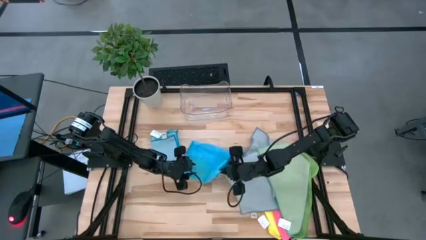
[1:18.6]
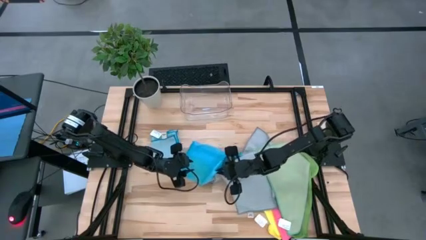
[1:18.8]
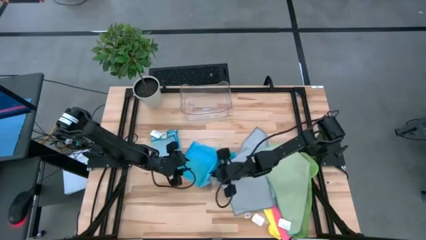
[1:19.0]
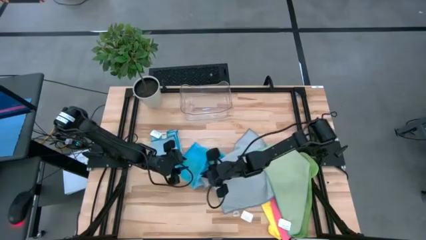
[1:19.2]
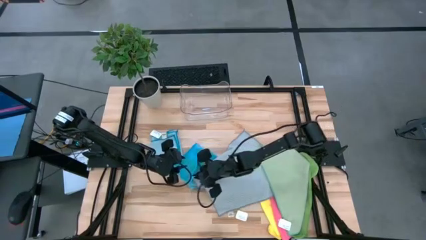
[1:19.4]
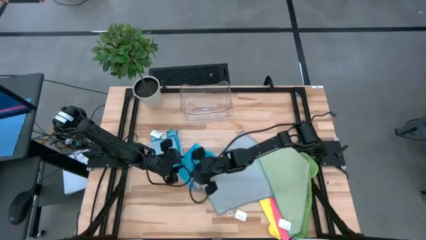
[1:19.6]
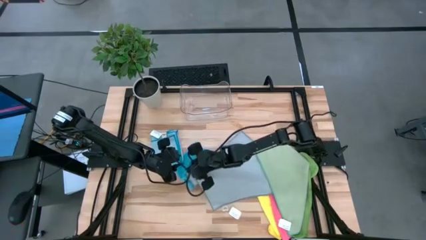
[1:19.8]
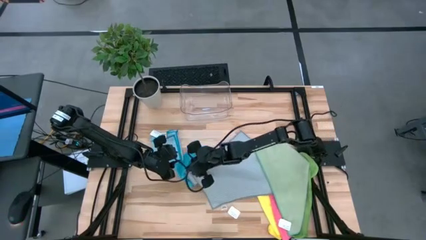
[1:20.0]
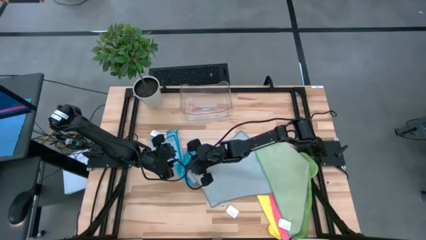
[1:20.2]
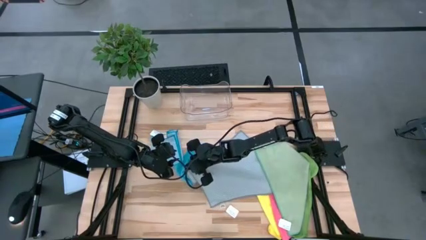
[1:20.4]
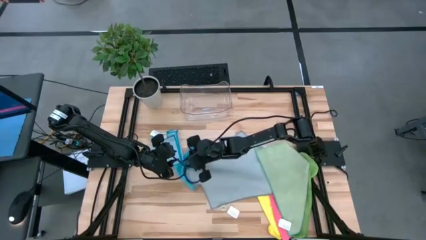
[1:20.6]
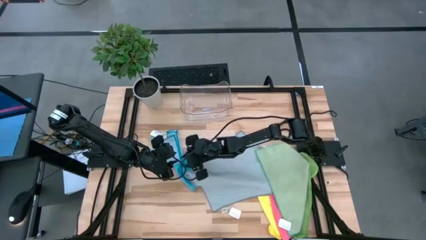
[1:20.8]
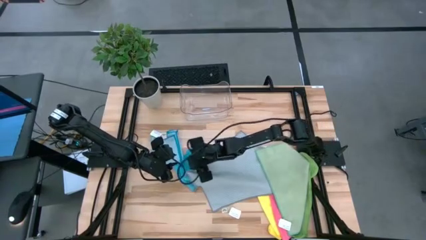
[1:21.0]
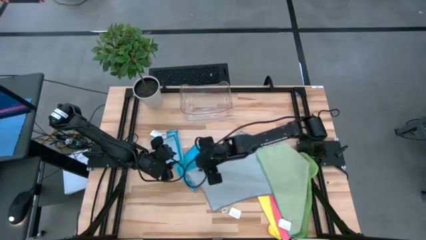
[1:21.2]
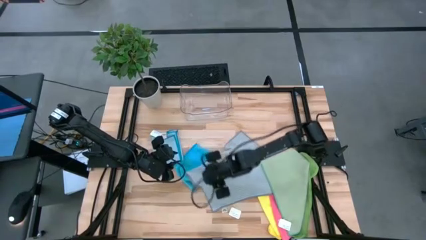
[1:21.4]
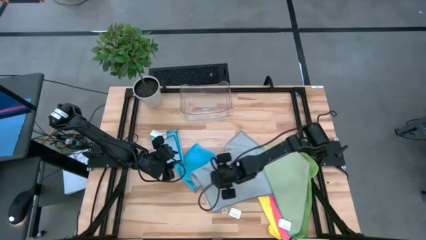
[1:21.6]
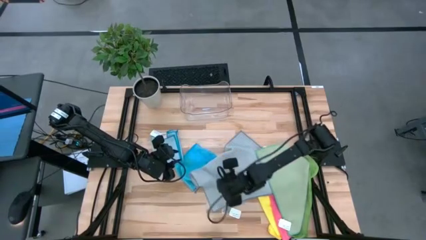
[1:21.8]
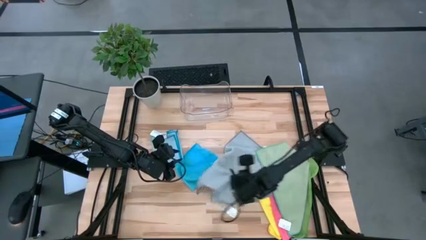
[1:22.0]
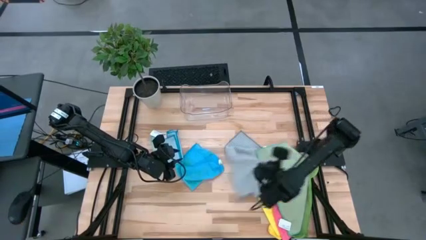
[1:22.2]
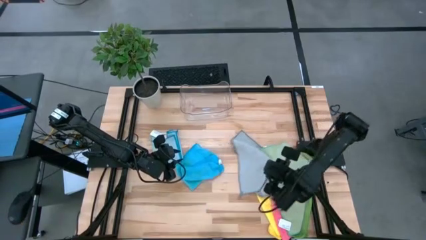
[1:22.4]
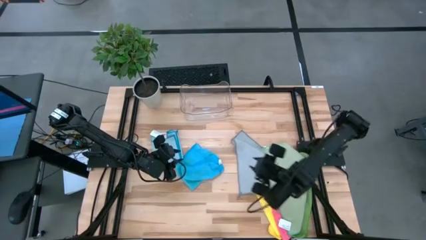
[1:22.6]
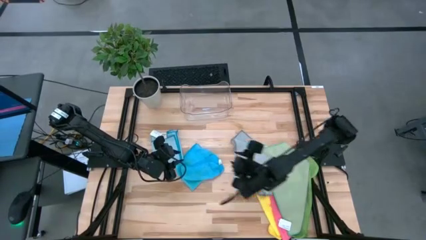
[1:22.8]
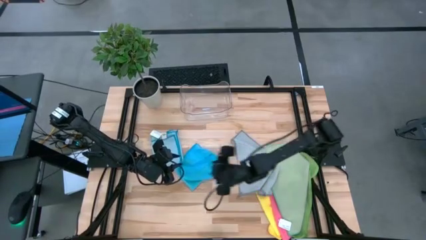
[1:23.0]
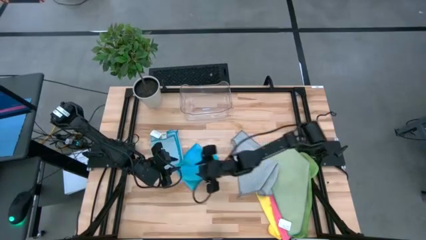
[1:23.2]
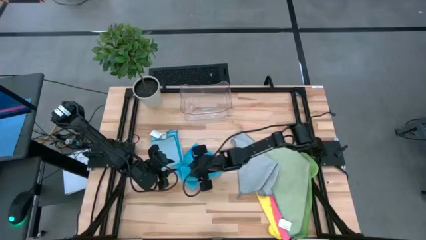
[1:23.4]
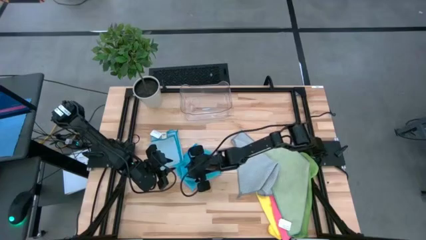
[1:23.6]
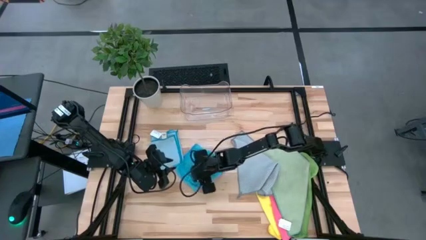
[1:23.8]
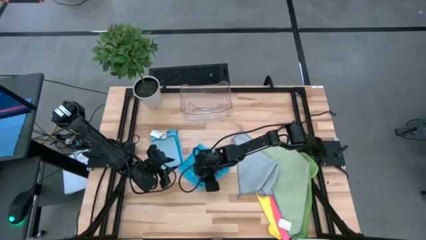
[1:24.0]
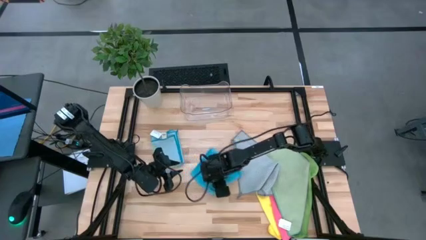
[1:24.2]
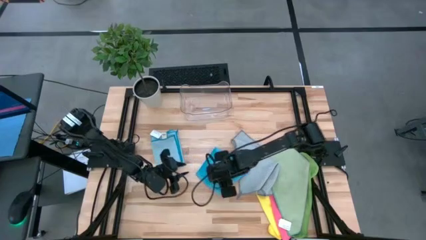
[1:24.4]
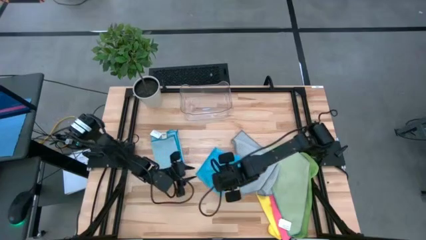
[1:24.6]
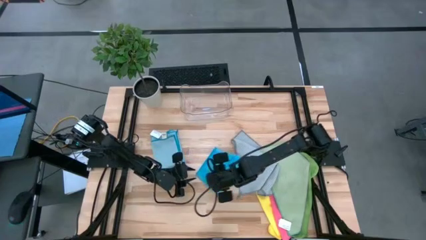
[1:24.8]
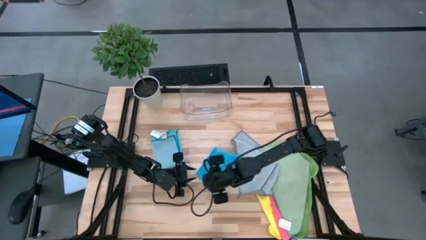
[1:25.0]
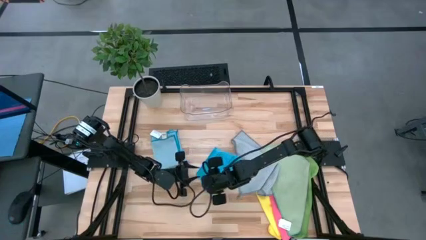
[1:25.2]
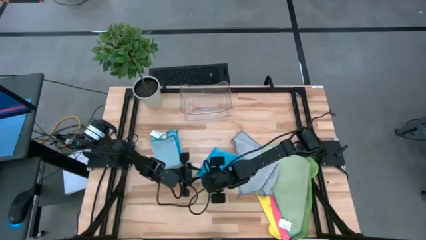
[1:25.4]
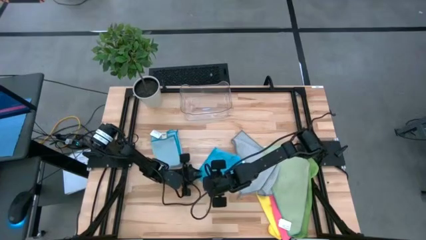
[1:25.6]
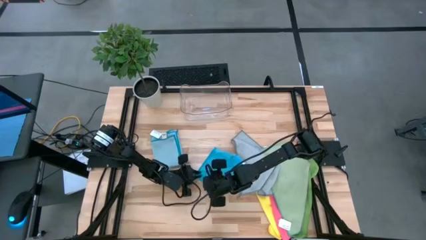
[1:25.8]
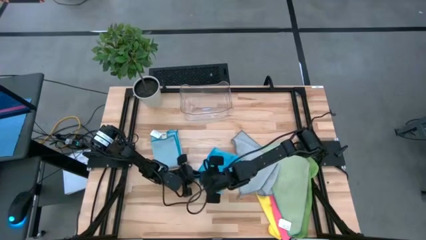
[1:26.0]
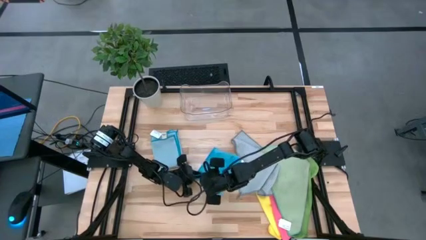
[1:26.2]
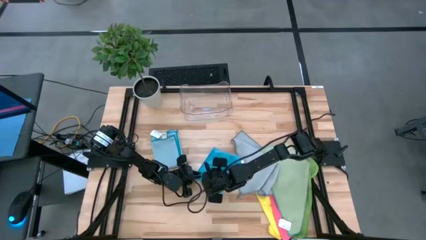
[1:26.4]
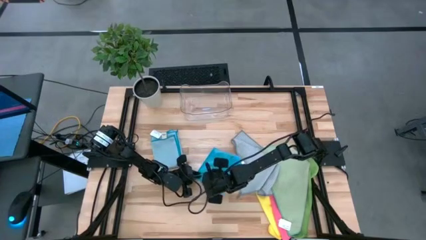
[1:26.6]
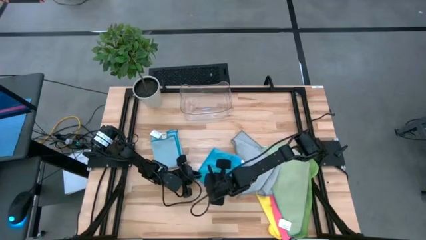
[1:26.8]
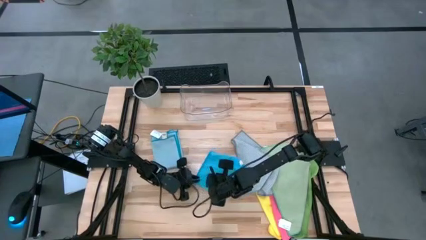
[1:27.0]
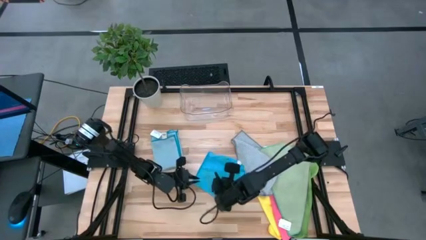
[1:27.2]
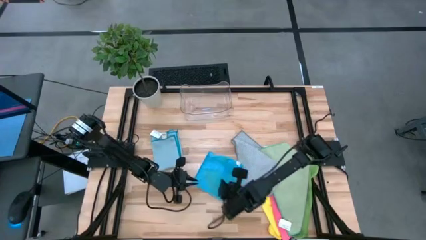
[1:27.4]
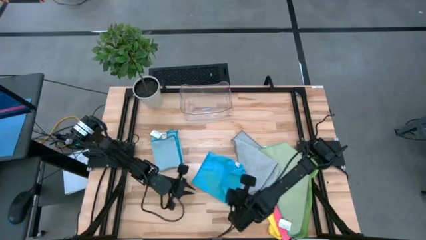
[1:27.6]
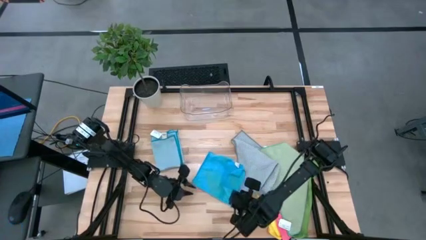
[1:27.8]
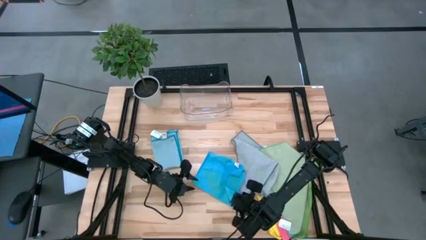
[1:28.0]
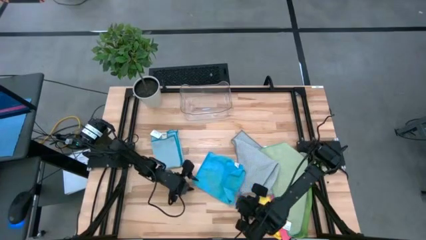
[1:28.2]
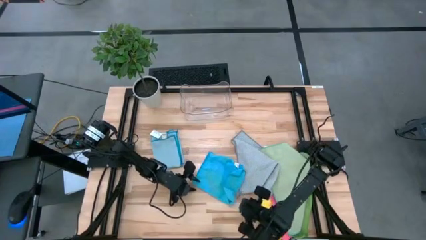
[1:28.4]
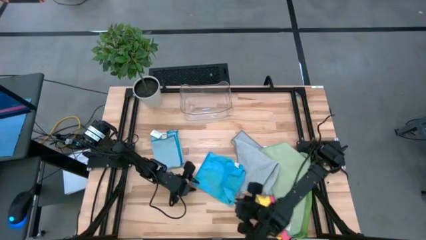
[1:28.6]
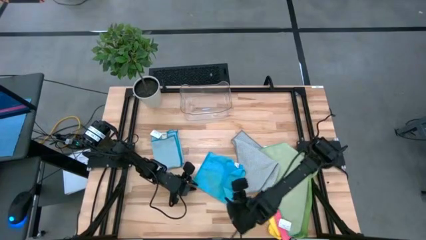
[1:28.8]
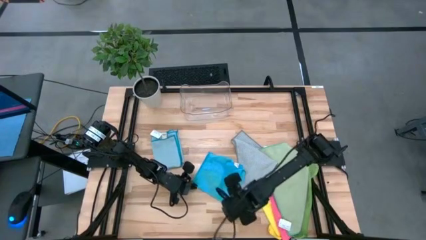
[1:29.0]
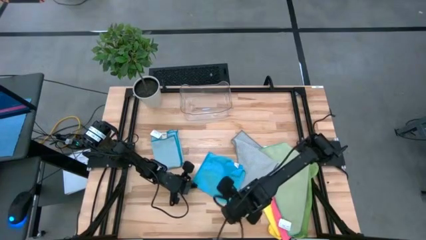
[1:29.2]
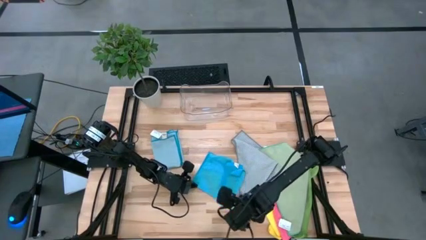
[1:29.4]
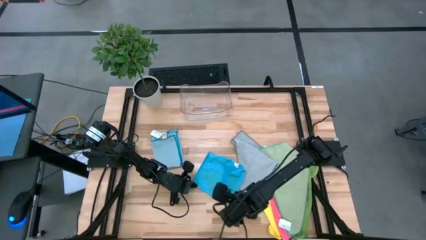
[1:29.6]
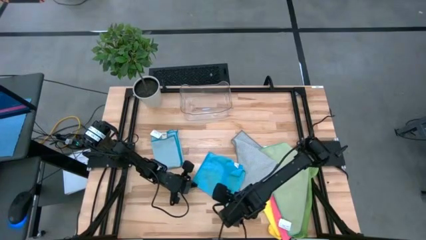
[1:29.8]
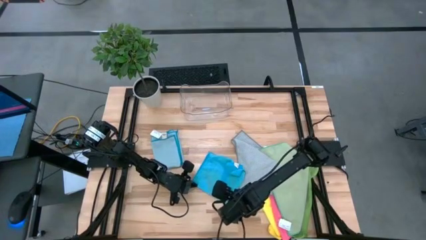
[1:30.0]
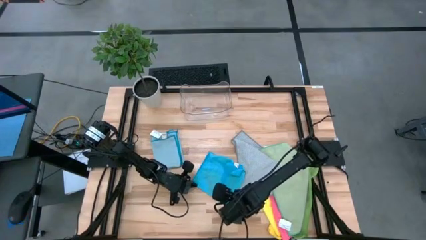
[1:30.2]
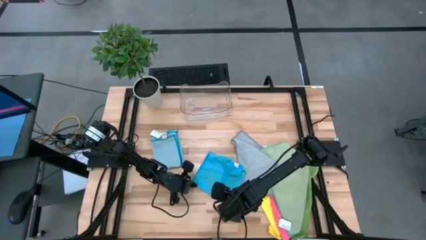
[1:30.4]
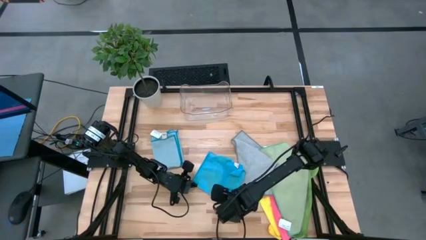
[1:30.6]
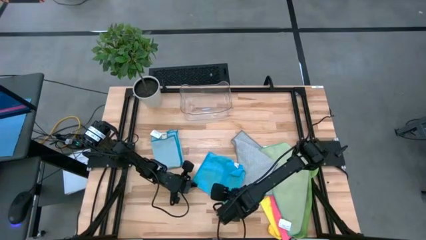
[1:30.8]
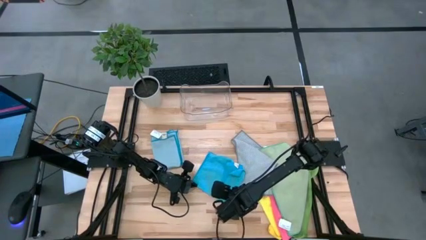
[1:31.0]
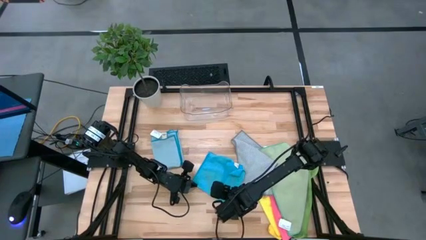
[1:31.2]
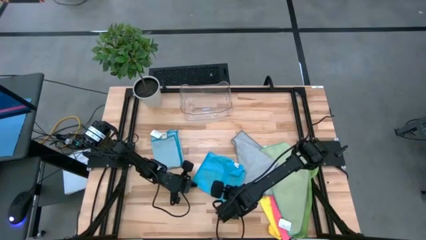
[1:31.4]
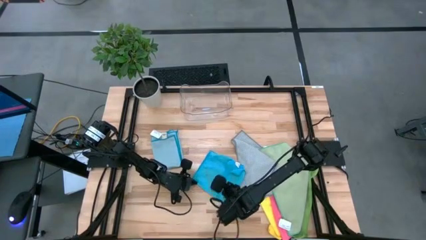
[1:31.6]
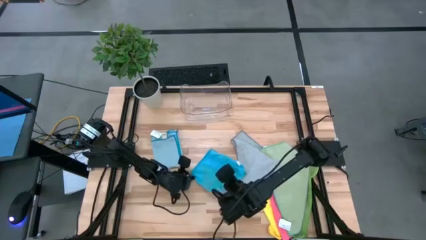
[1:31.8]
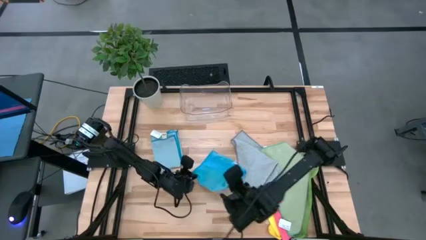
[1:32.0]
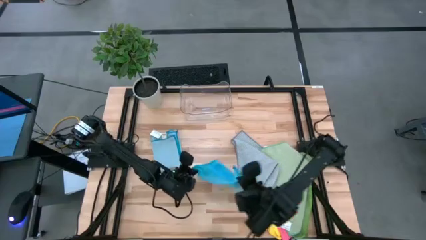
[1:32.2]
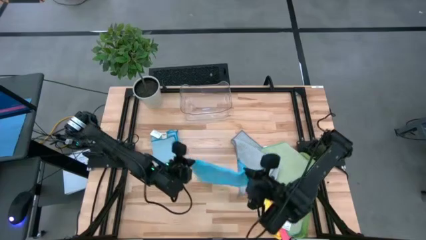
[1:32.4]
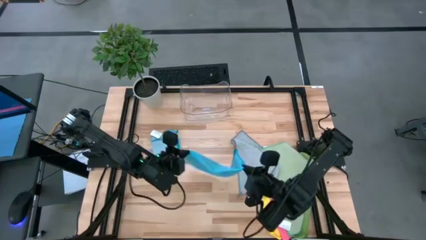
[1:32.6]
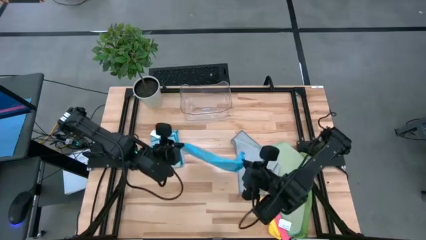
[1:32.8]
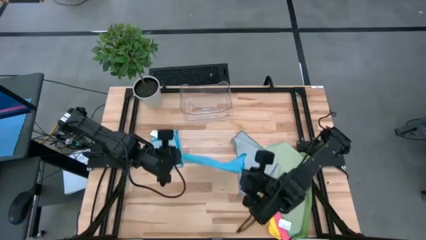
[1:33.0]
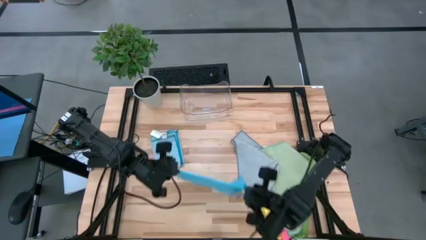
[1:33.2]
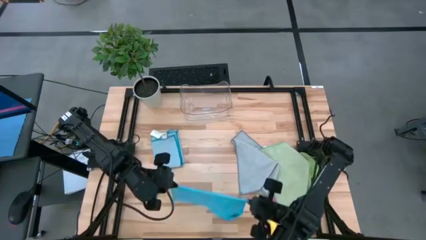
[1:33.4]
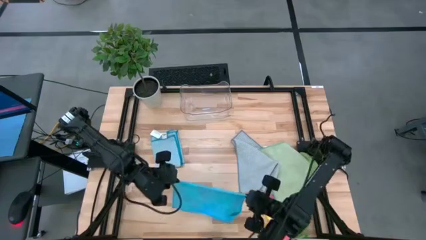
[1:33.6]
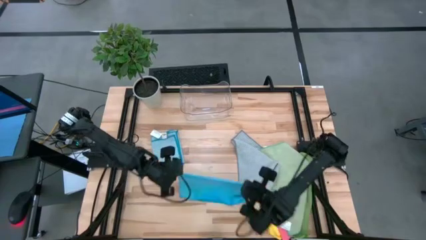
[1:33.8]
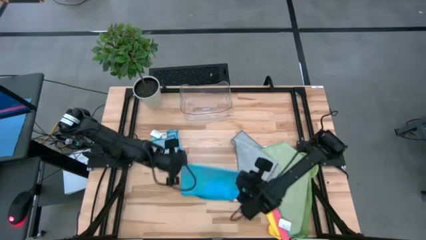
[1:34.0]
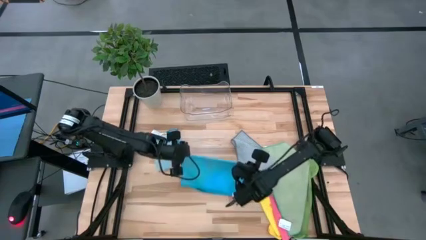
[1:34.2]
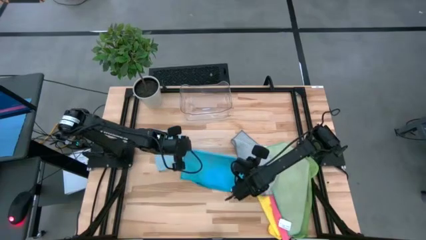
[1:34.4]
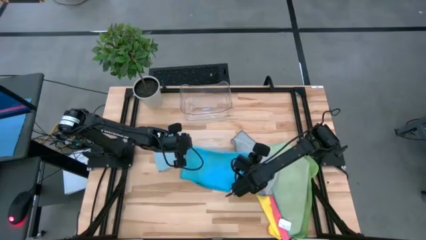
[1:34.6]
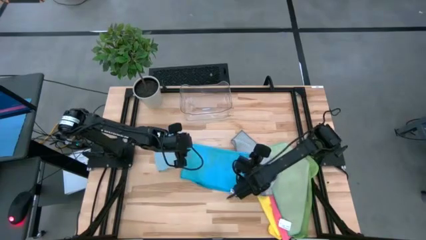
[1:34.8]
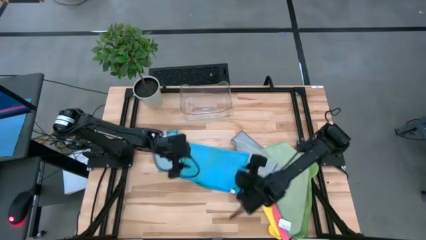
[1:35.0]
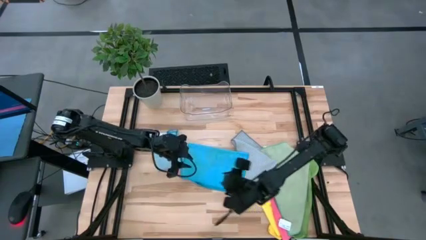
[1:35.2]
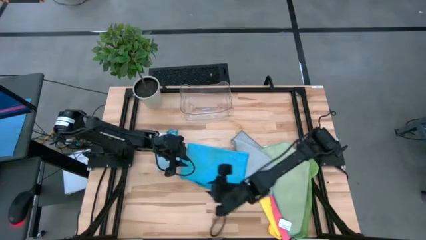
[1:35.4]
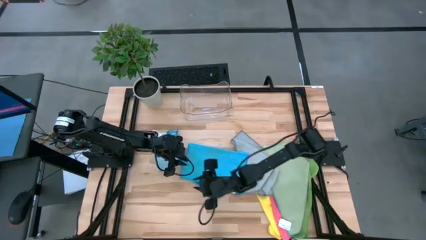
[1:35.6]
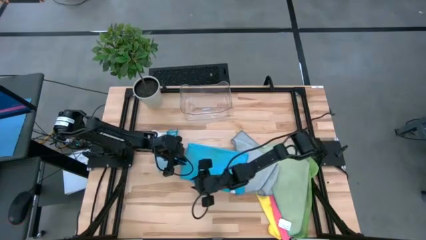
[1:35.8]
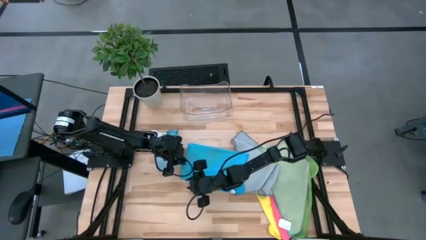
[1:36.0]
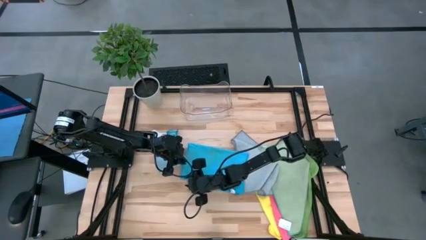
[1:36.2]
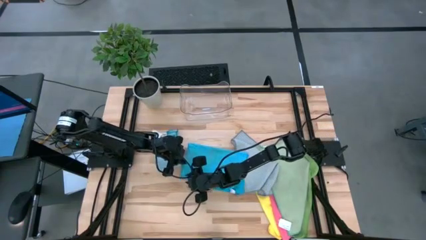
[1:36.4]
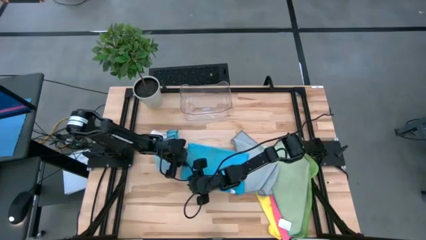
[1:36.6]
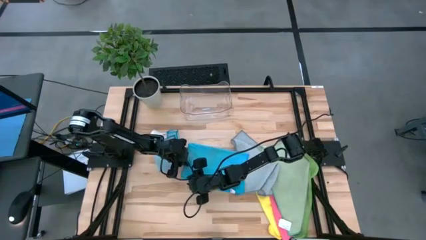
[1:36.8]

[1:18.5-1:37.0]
Task: Fold microfiber towels
Fold the blue microfiber cloth
